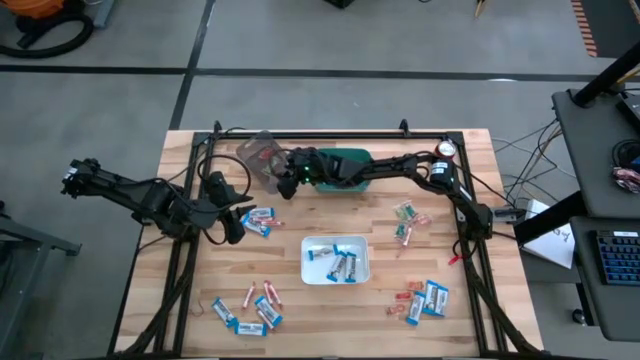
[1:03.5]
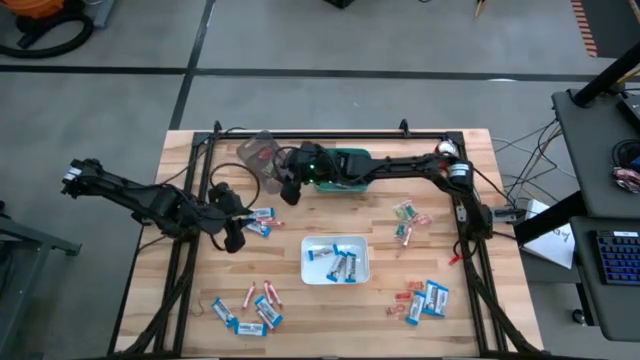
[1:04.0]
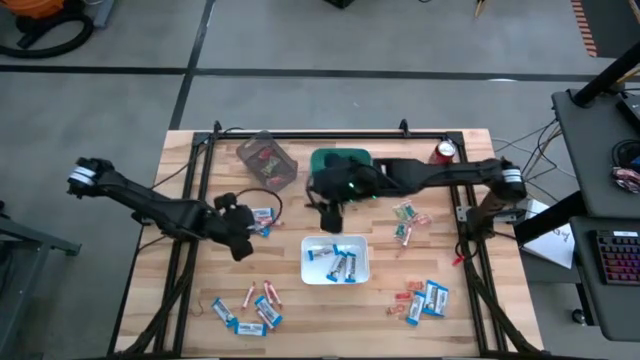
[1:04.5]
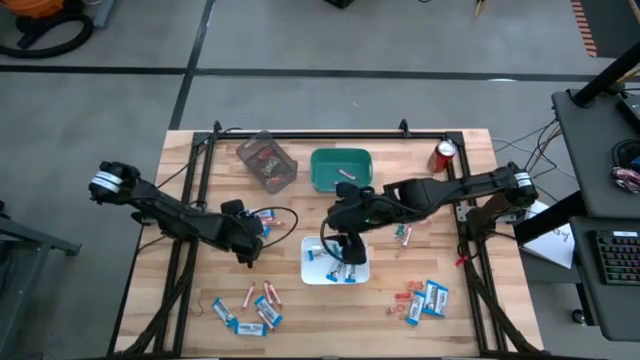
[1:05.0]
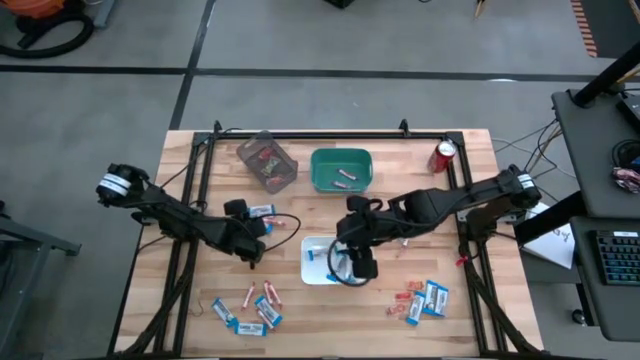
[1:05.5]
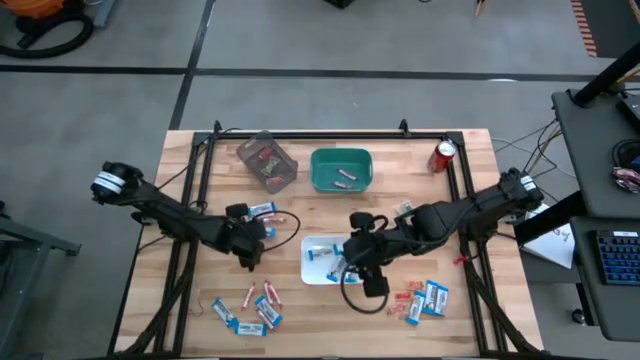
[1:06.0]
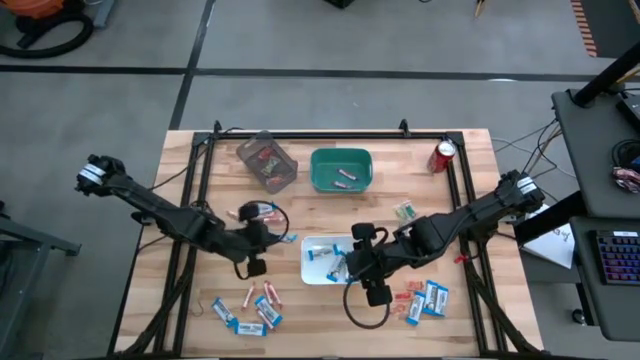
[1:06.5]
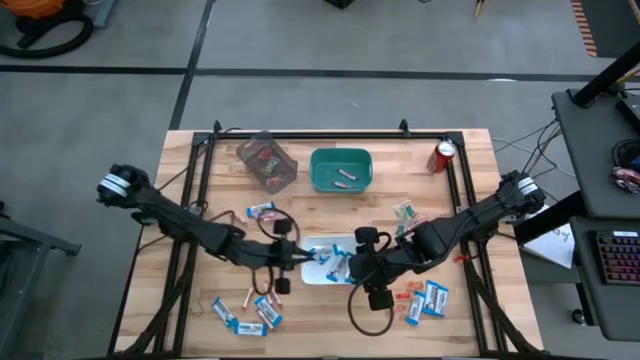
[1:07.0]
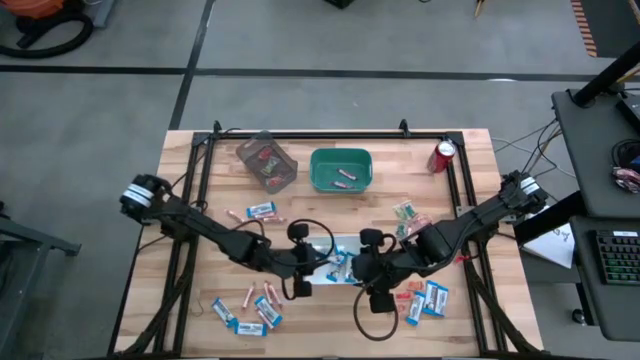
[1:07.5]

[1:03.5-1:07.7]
Task: Sort candy
Put the white chocolate bar into the white bin

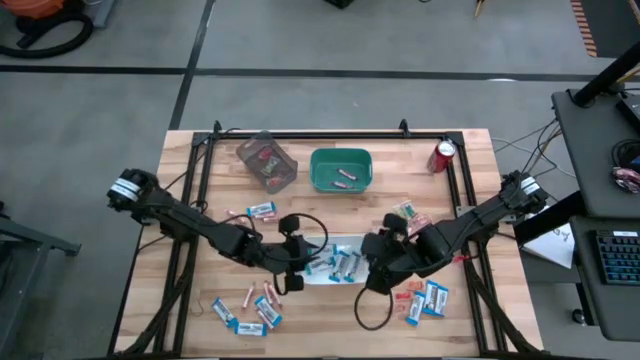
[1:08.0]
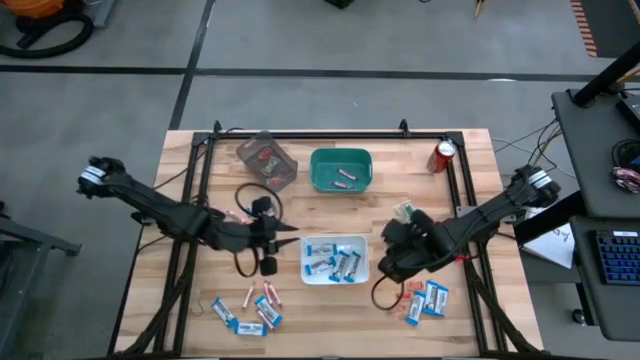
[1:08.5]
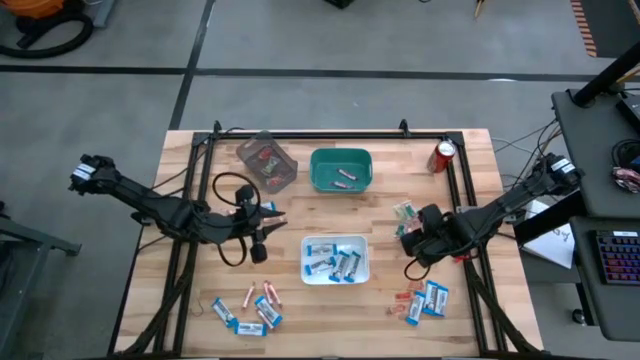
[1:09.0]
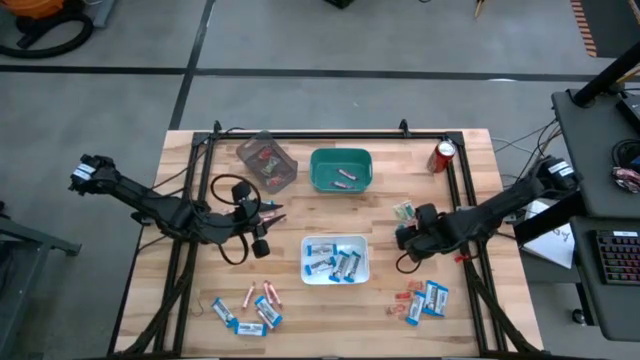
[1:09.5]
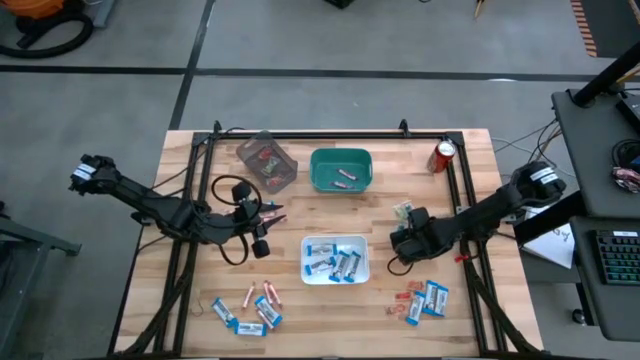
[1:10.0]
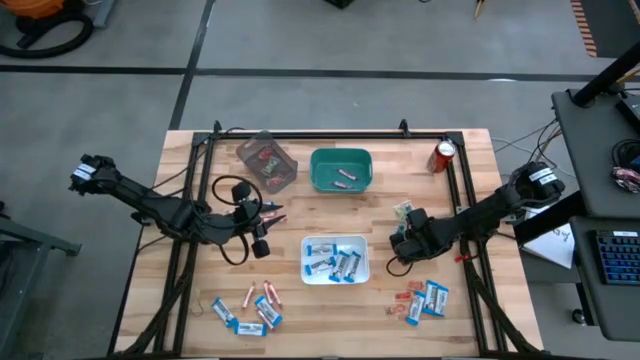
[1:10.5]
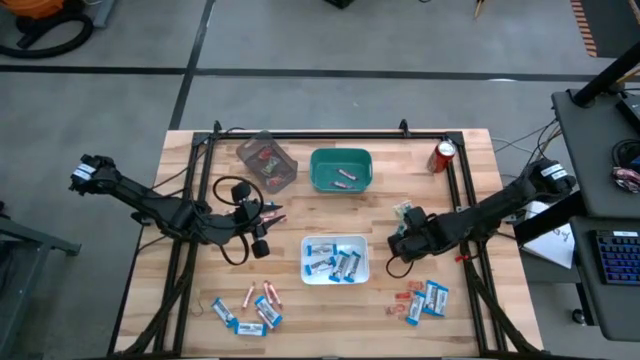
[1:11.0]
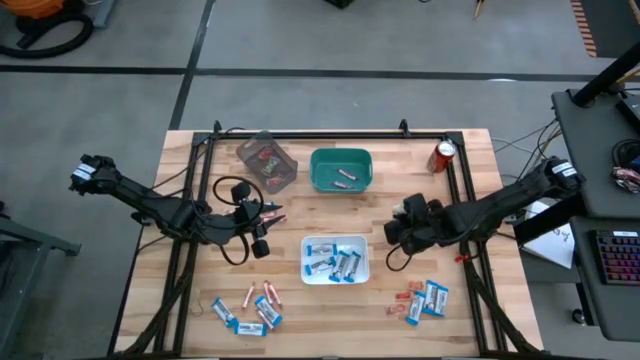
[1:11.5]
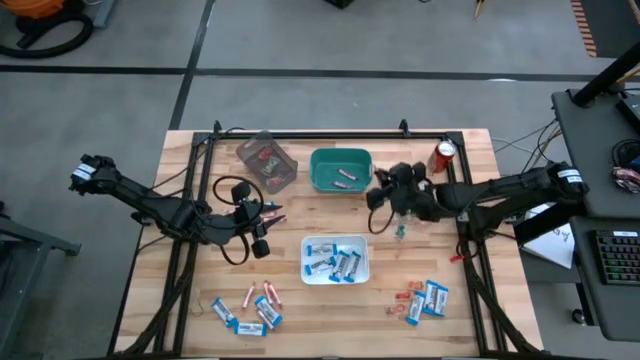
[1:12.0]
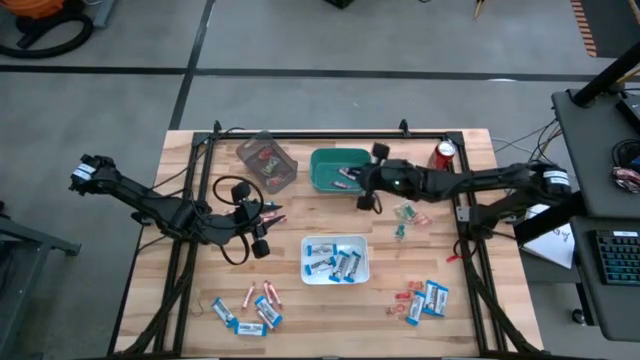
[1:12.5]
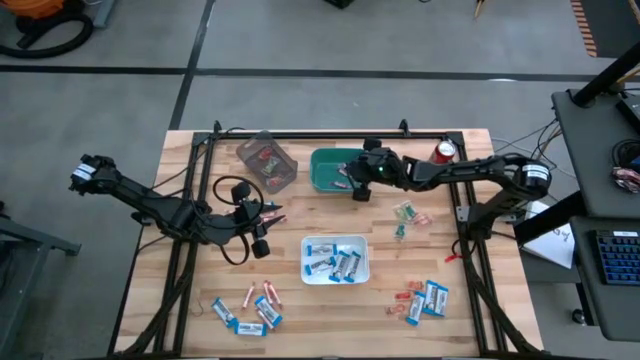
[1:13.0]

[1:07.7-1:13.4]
Put the white candy into the green bin

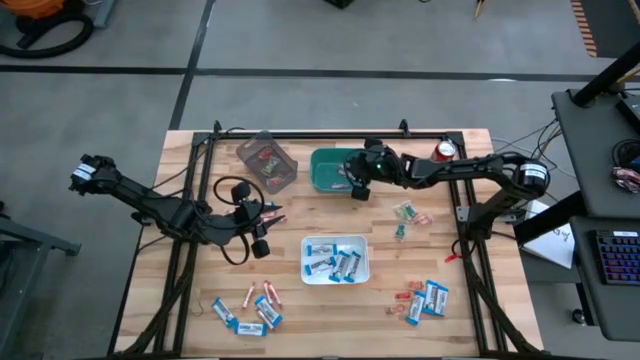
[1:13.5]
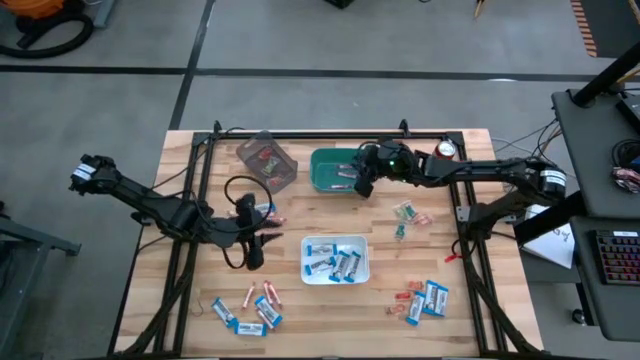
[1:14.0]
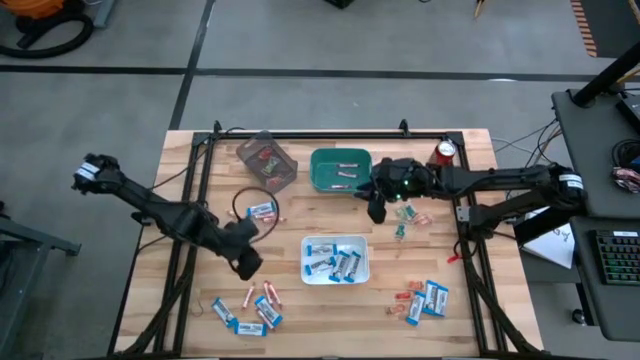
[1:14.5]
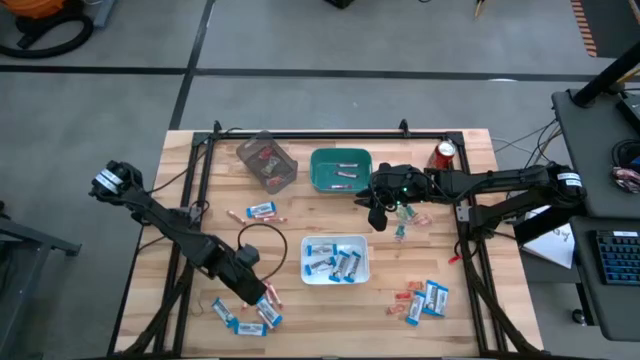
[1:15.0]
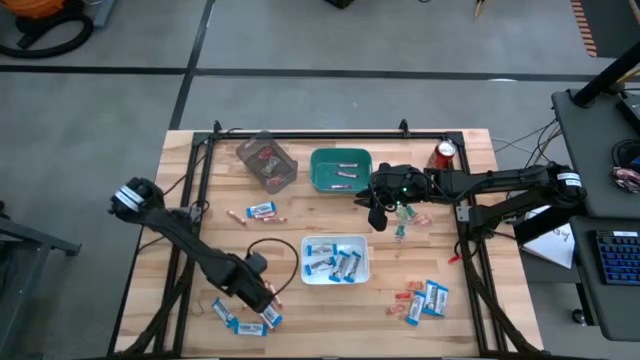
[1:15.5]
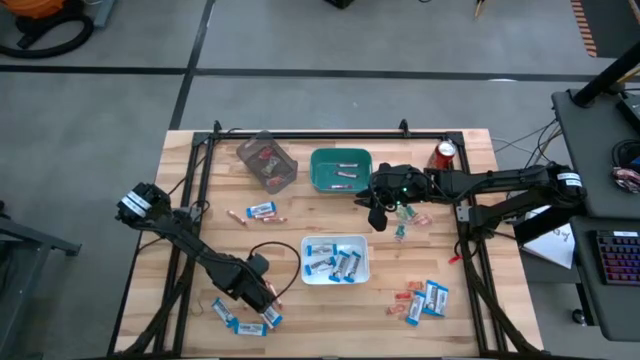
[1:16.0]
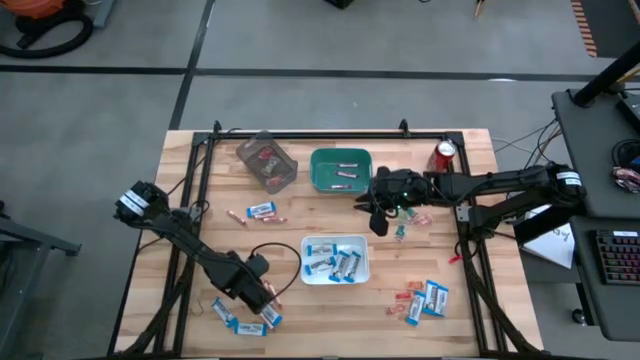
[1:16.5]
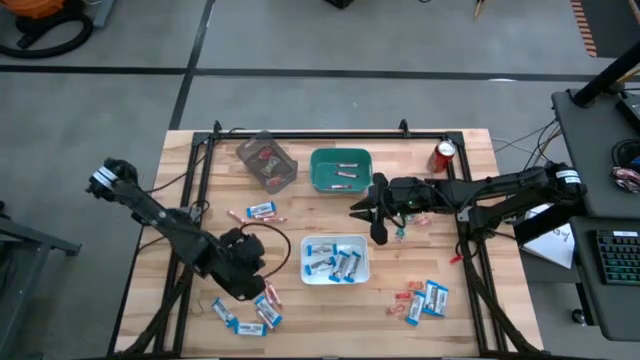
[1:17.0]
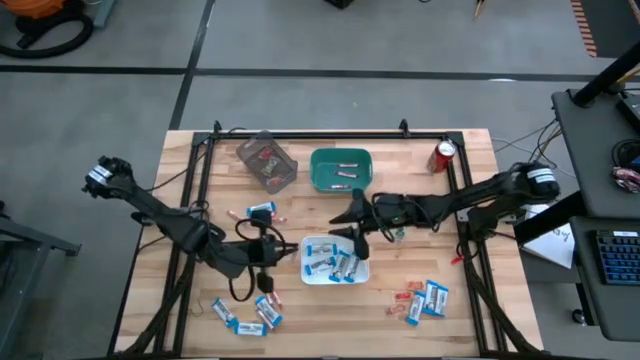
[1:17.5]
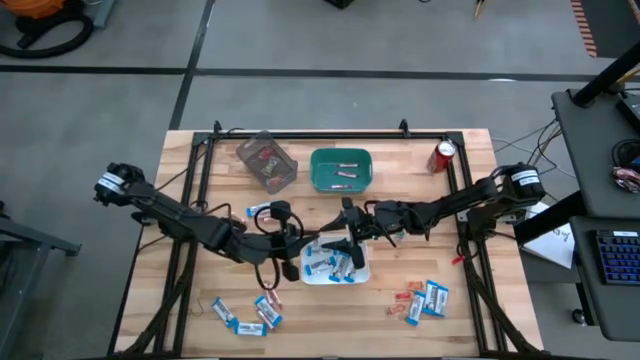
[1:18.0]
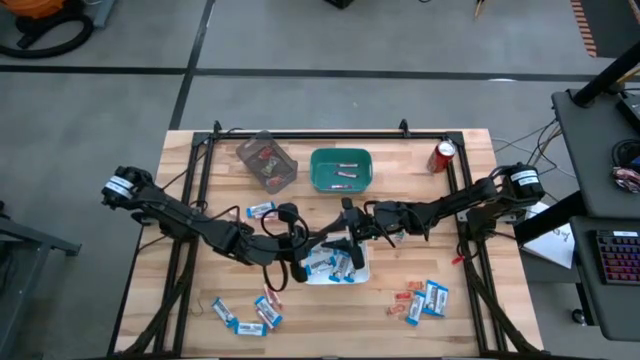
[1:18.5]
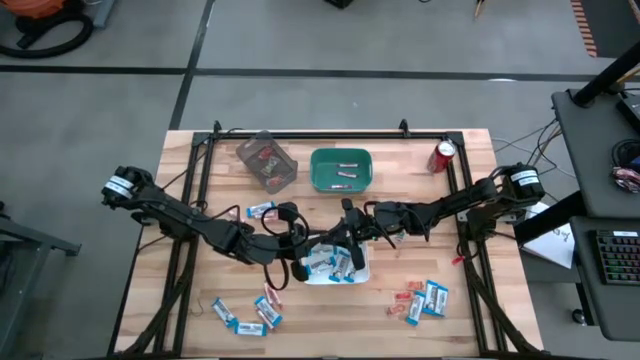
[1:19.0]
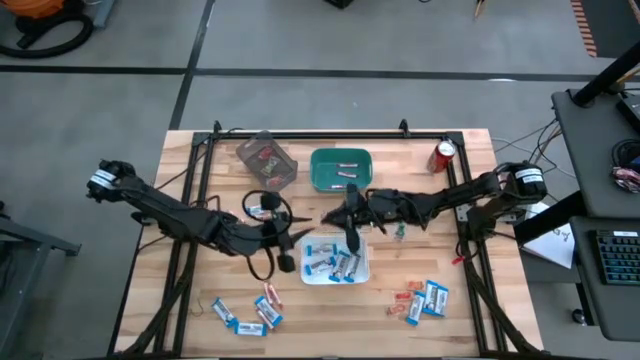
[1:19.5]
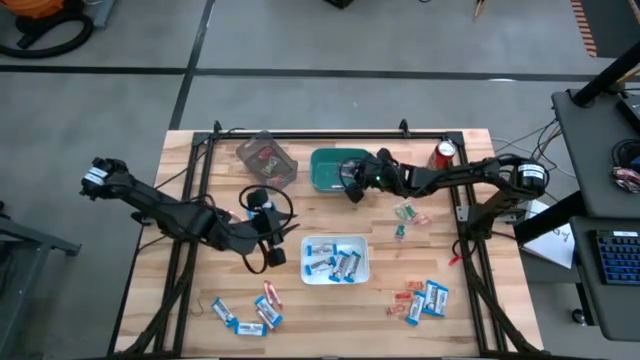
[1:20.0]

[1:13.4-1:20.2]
Put the white candy into the green bin

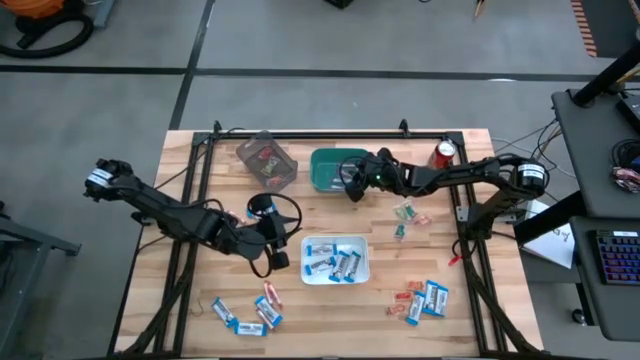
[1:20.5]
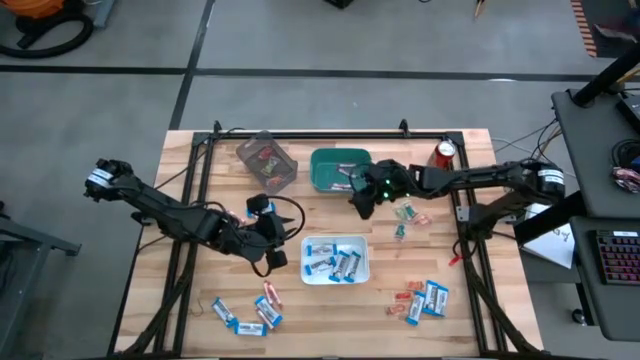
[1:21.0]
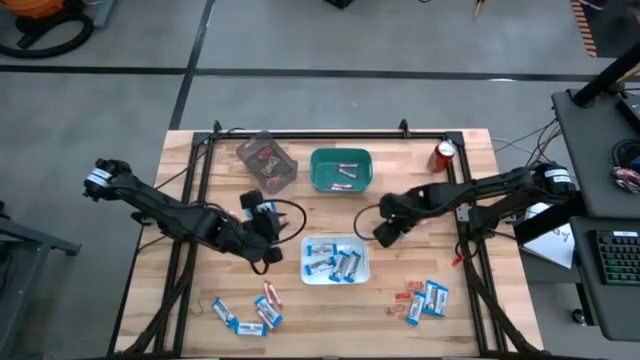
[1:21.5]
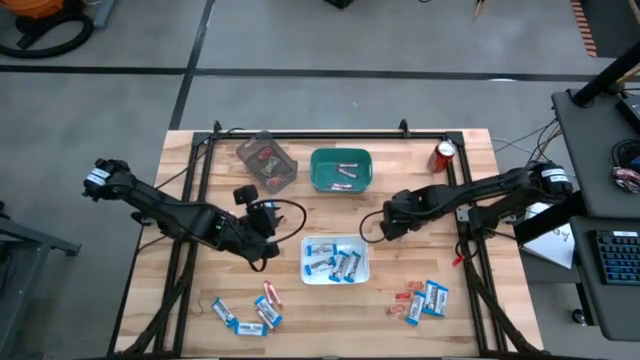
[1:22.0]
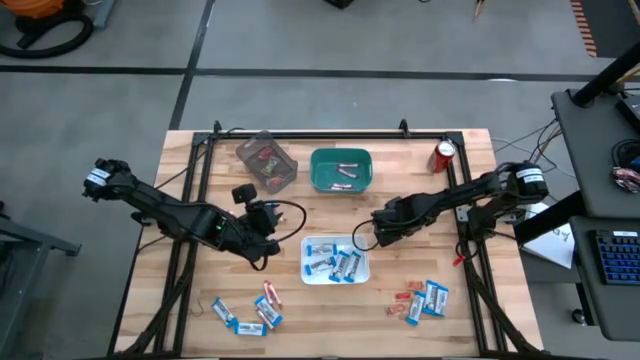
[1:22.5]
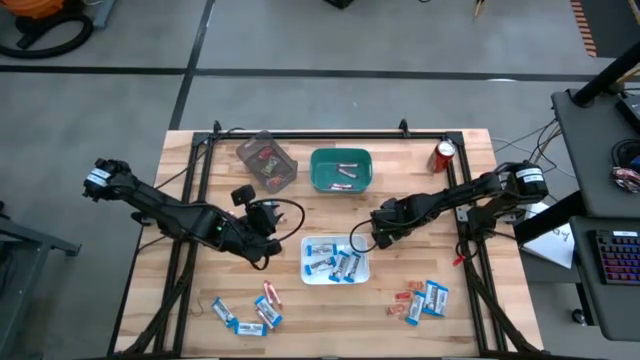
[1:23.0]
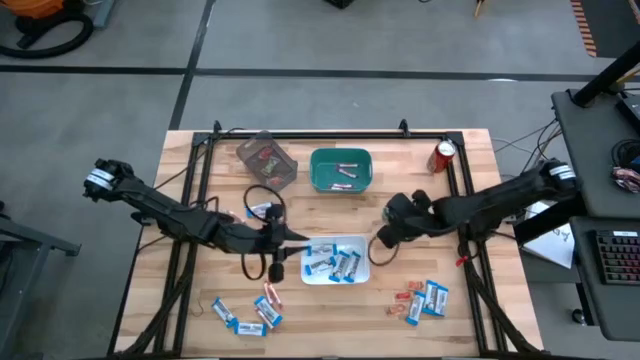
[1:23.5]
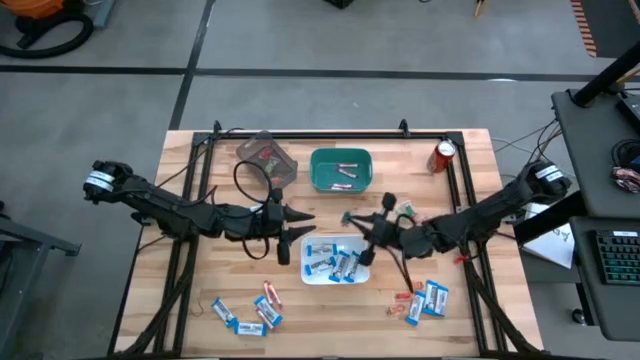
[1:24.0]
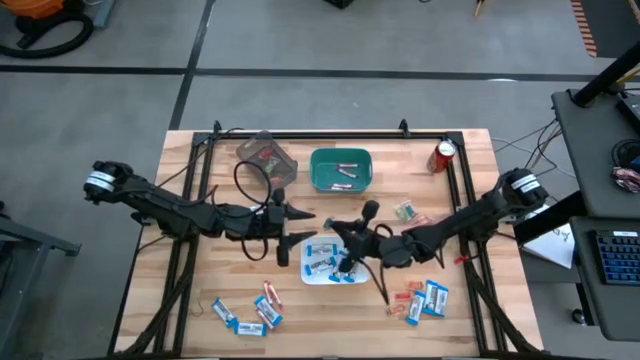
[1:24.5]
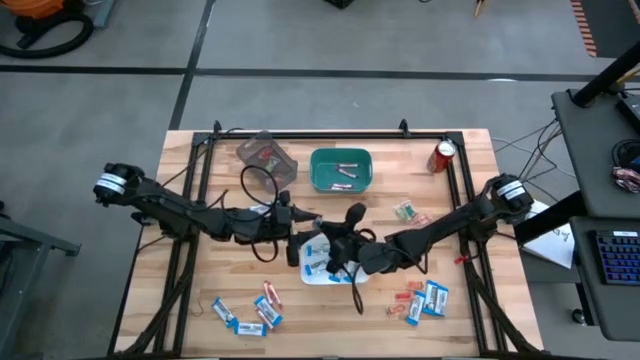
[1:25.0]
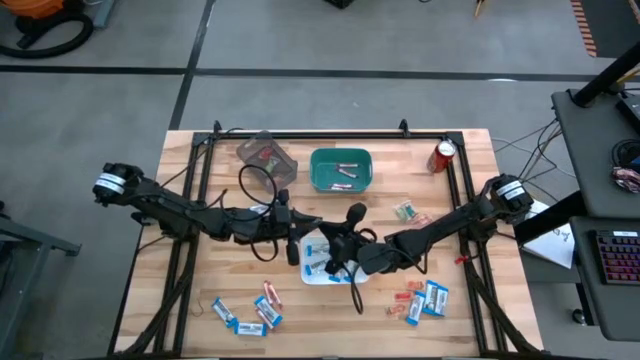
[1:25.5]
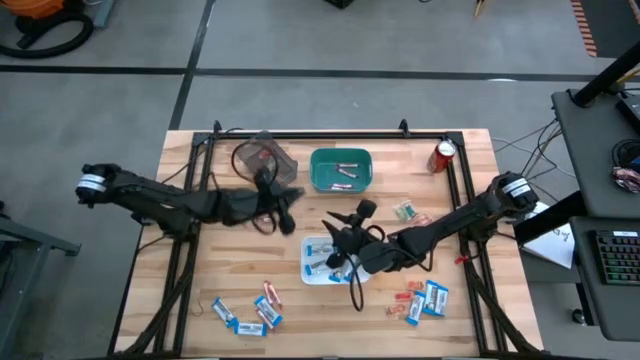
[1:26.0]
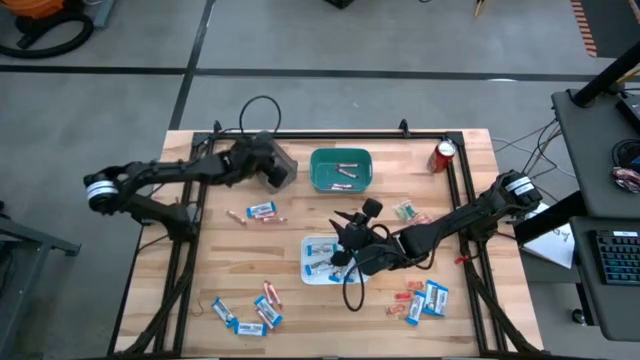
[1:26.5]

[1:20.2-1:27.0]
Put the blue gummy into the black bin
